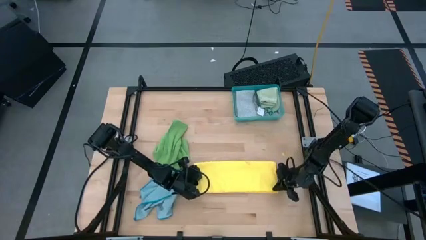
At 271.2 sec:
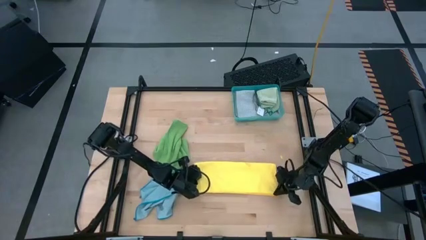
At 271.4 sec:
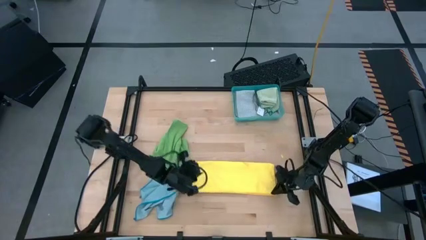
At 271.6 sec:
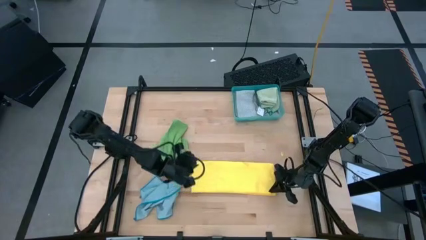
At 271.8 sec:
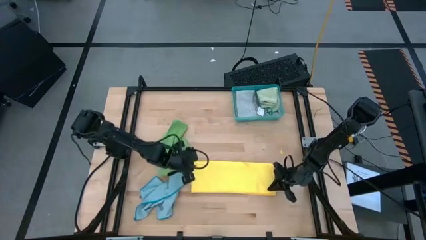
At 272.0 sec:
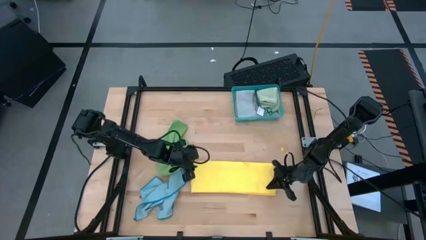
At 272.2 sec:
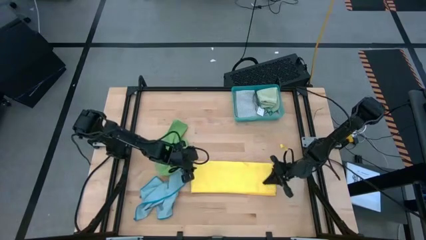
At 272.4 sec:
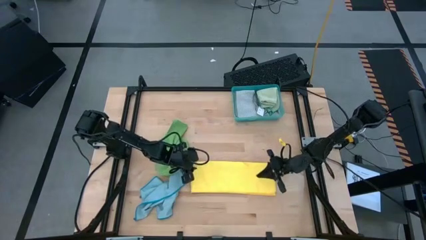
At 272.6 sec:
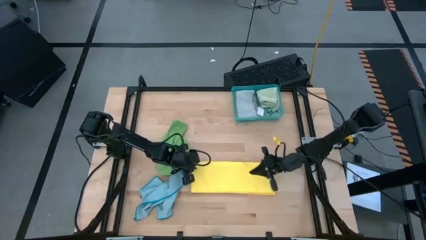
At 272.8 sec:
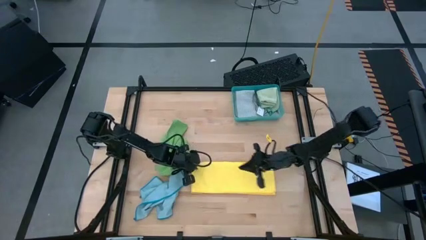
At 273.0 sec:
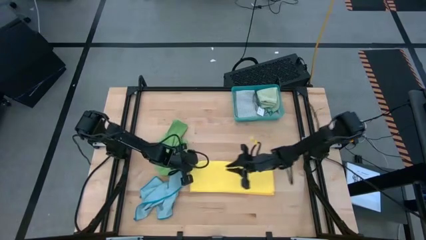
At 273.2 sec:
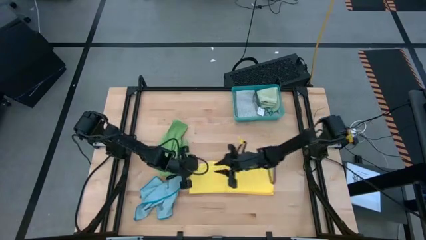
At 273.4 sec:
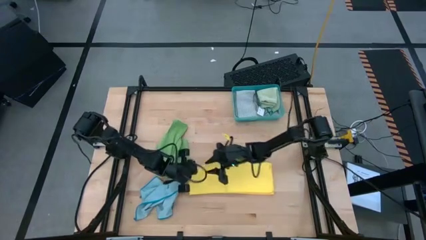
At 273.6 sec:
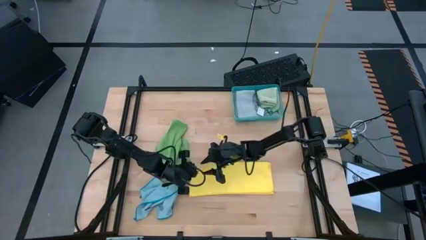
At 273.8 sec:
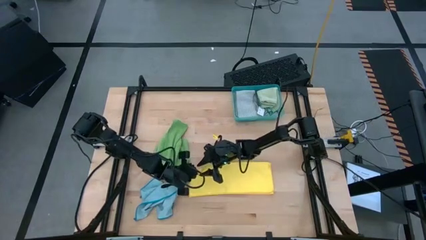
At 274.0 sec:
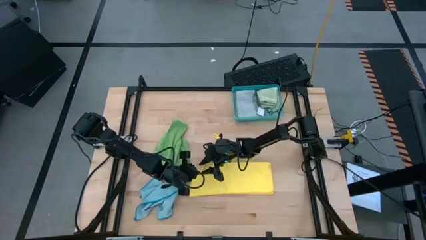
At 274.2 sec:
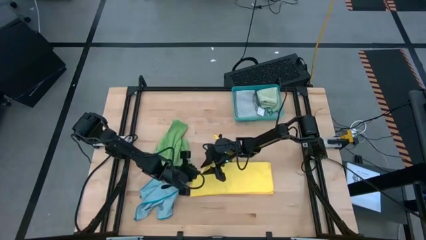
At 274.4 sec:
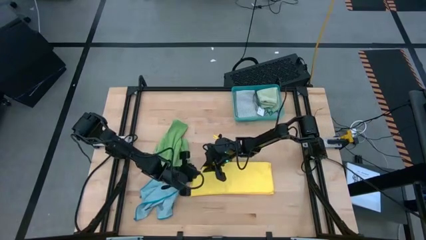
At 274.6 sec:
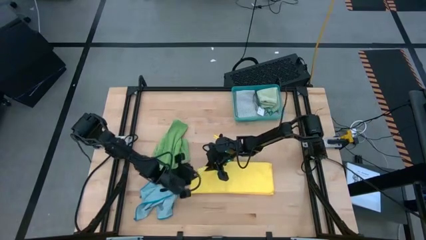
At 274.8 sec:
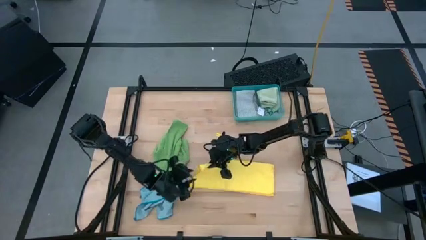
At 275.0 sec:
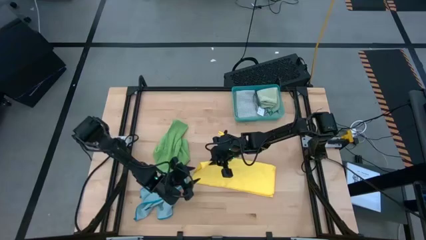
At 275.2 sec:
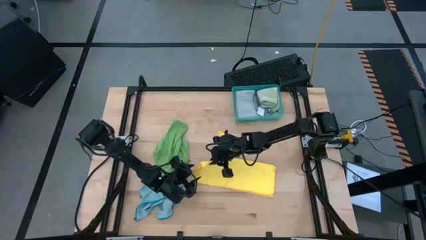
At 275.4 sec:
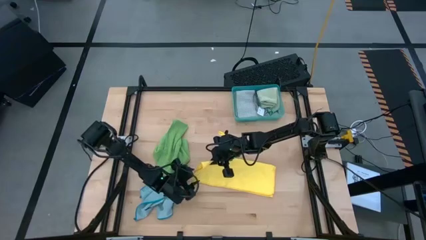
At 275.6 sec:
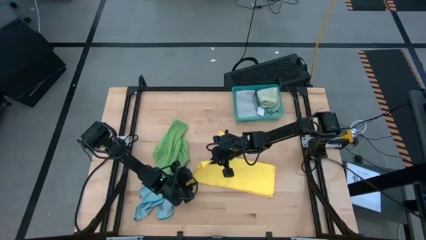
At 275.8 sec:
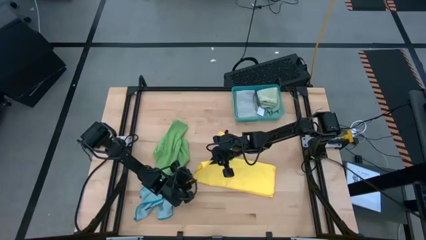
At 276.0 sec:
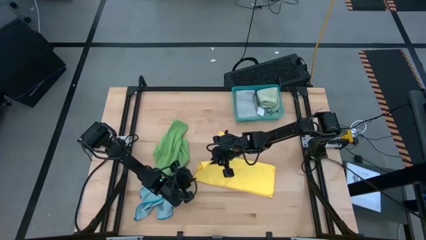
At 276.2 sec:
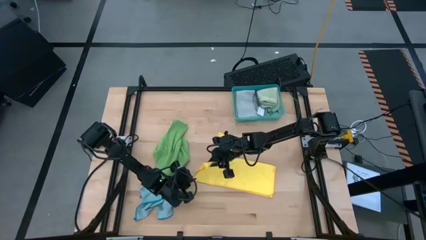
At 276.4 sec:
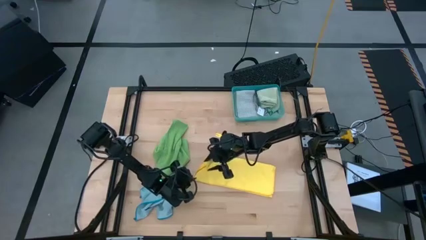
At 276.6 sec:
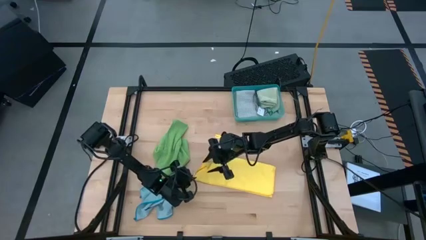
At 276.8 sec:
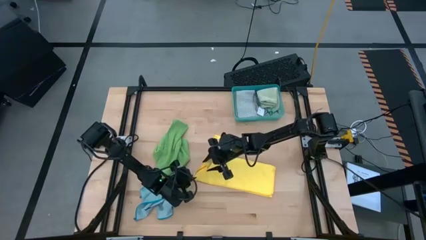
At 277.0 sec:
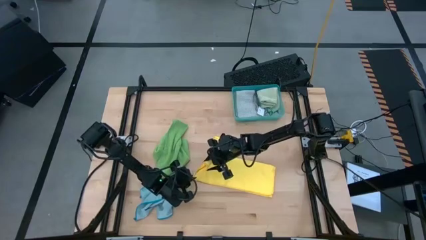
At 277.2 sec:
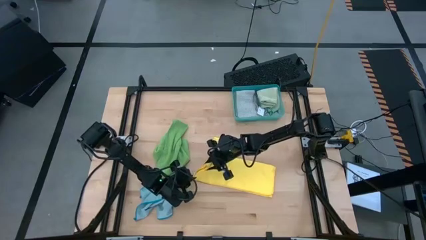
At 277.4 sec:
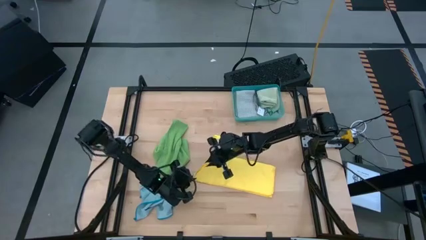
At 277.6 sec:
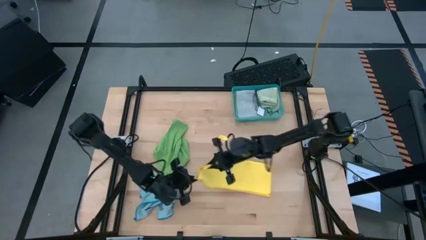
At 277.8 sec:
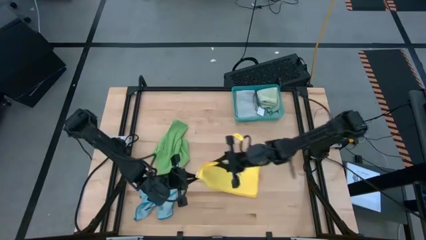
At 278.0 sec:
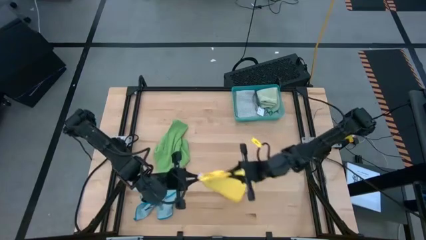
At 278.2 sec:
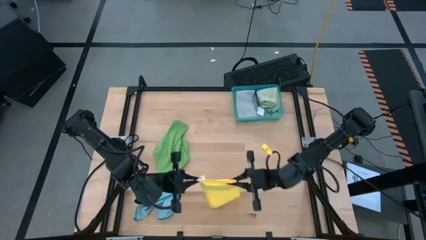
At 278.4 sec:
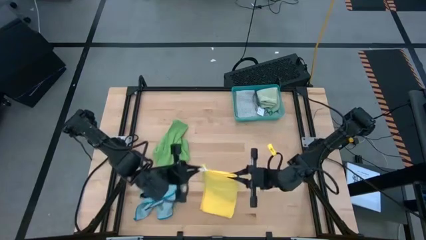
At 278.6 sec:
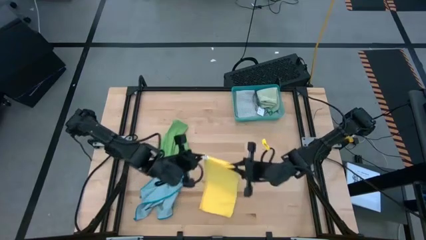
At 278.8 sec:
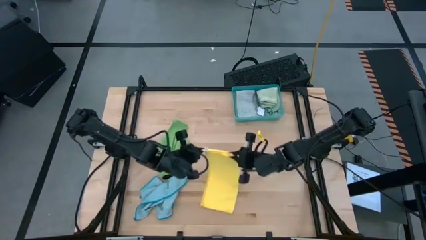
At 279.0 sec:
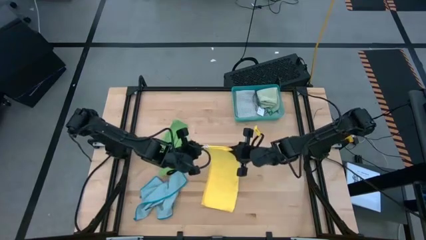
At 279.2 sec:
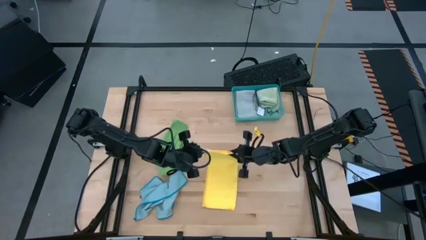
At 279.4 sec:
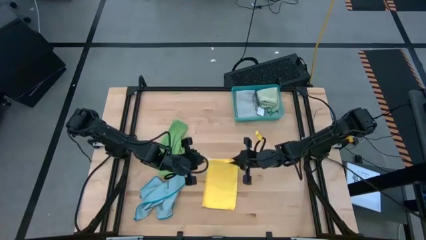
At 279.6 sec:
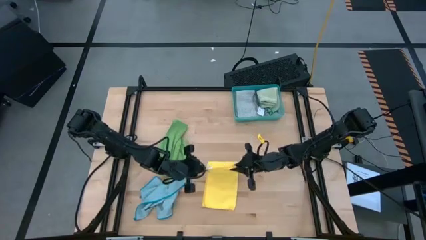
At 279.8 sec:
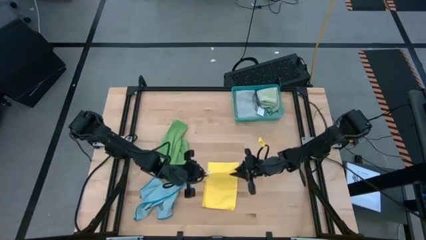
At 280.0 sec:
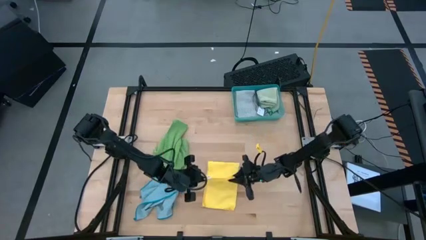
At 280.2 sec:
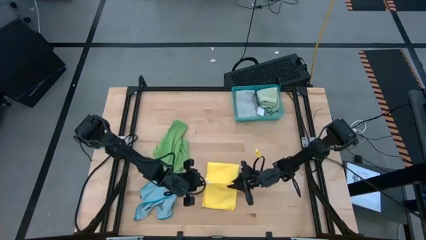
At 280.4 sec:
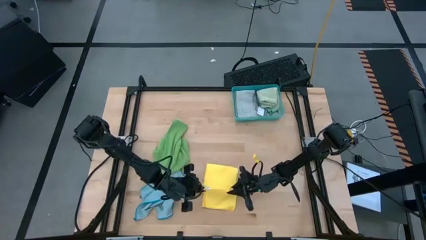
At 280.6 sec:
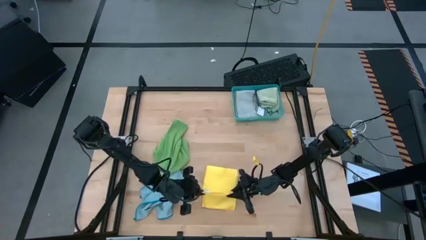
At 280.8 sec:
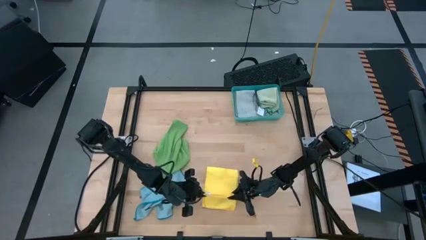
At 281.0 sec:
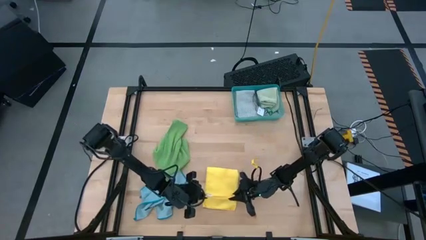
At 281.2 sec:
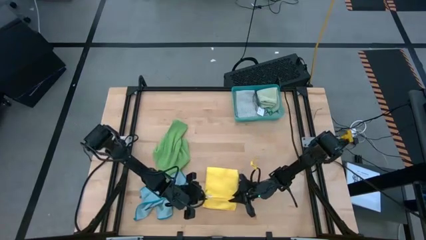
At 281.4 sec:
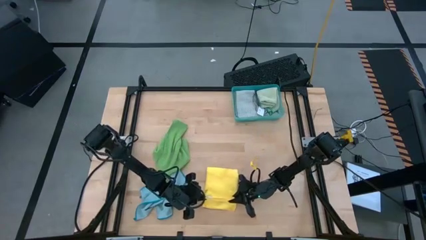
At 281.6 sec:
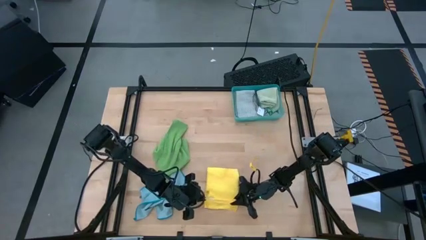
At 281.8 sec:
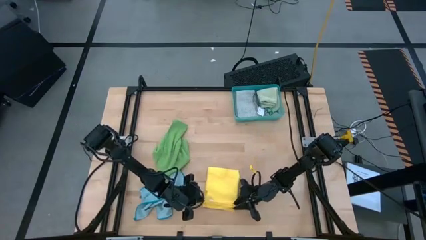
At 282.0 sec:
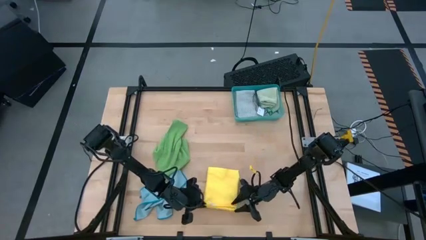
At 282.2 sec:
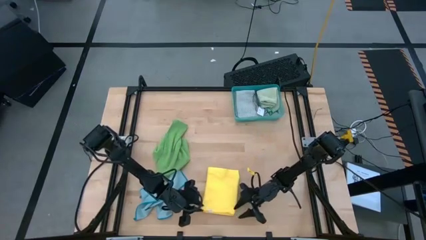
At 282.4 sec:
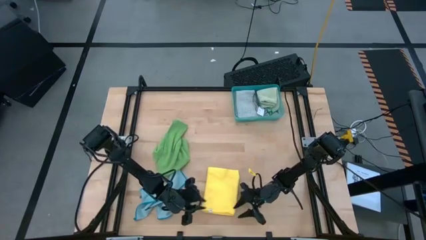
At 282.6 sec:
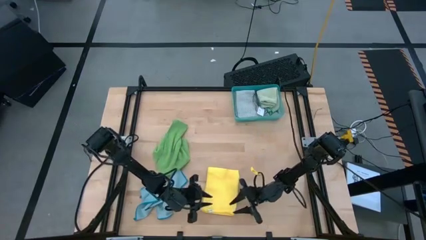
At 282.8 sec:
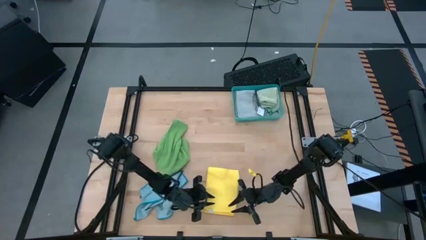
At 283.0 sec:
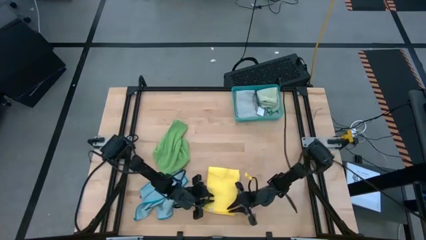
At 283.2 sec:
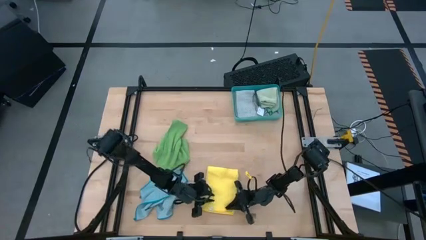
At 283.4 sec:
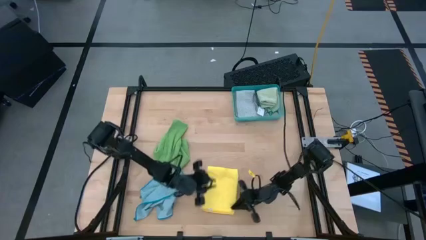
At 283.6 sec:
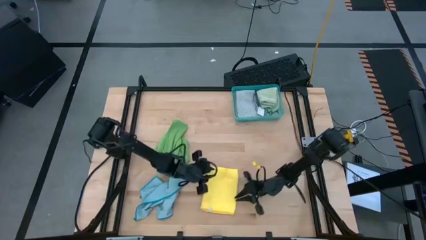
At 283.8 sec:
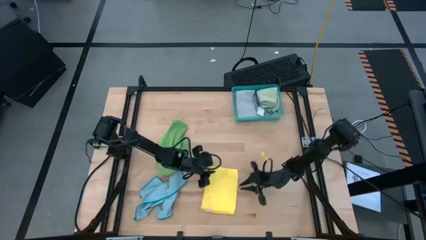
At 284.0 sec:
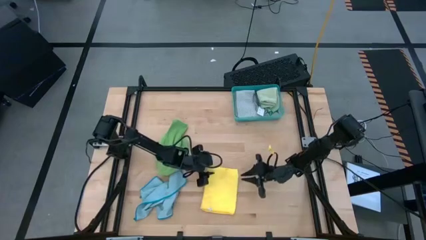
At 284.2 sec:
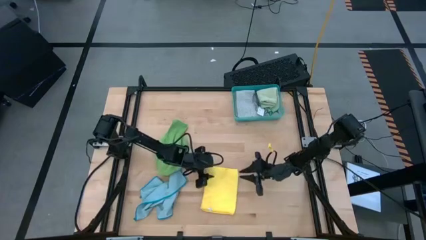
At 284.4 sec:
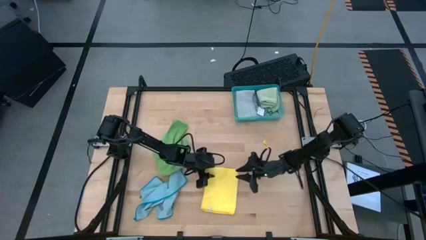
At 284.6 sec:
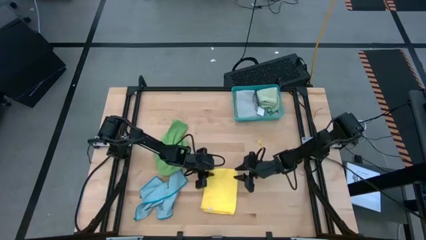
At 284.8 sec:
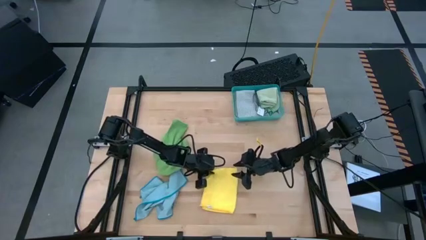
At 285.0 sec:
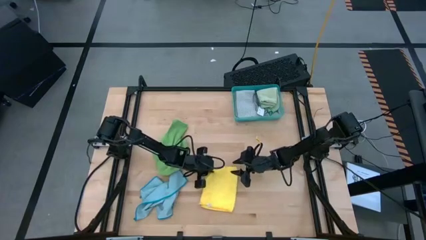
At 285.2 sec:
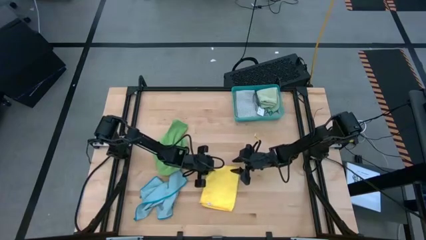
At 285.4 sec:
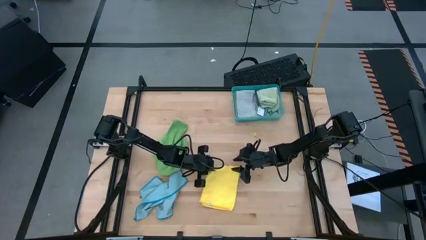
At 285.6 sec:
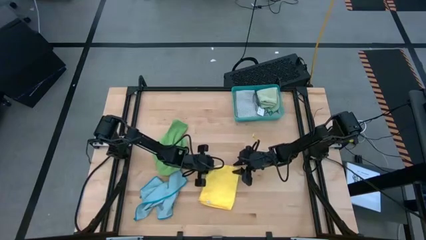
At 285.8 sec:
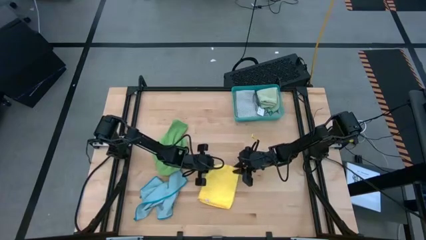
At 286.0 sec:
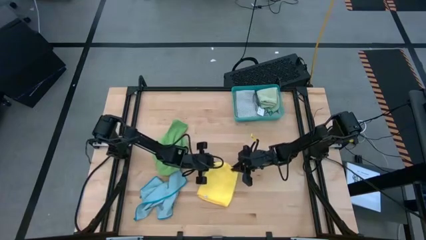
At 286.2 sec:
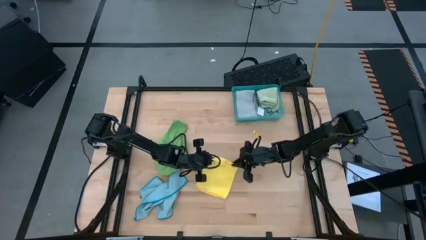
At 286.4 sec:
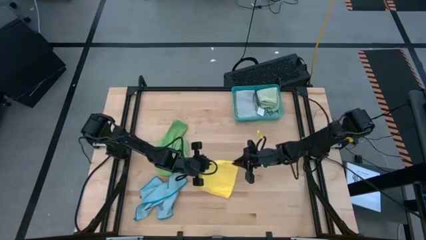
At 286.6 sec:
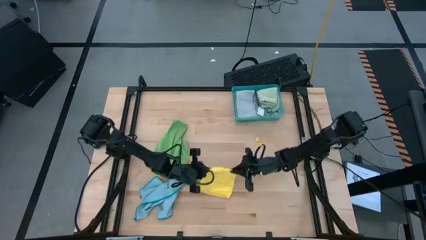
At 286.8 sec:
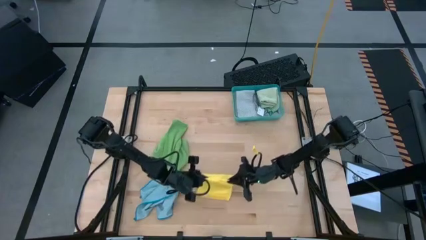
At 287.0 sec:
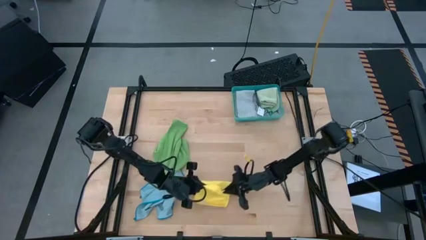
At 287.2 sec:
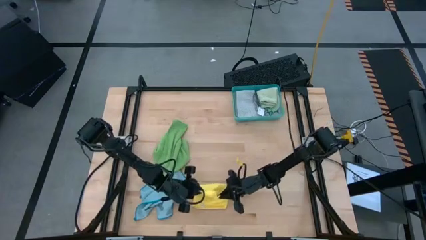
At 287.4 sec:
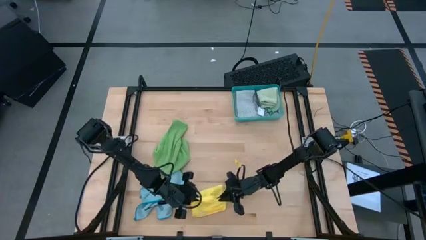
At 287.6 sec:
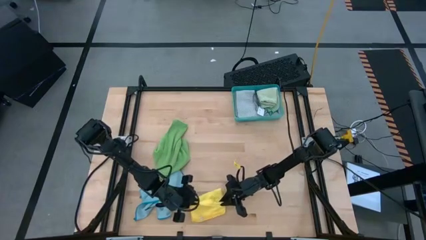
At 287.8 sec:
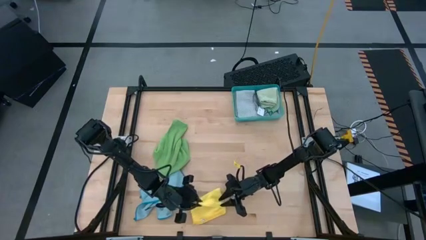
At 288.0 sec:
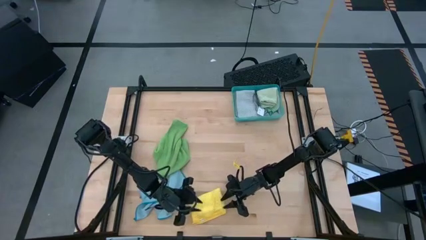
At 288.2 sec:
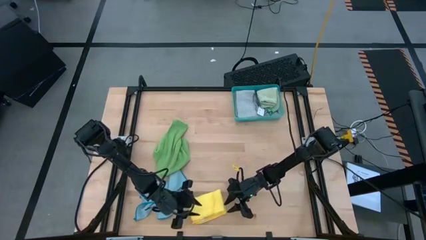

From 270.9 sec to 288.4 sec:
Task: Fold microfiber towels
Fold the yellow microfiber cloth
